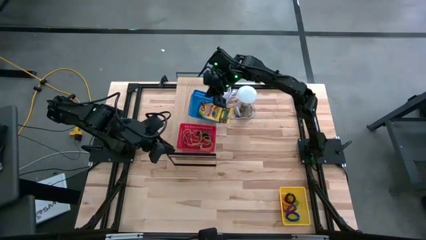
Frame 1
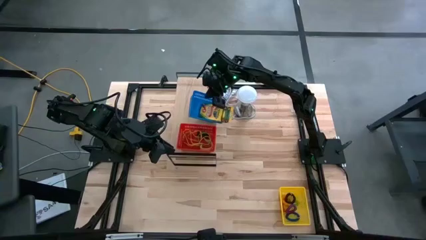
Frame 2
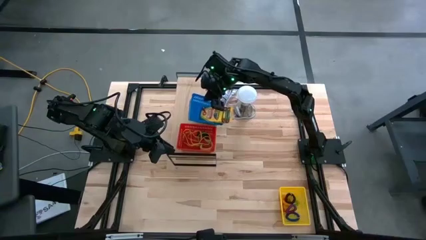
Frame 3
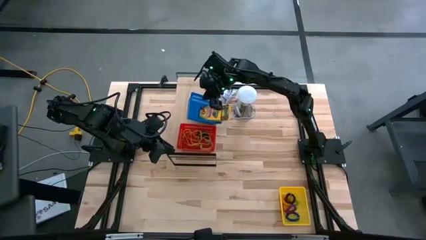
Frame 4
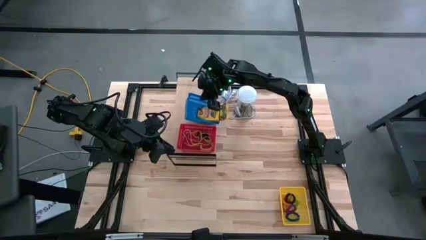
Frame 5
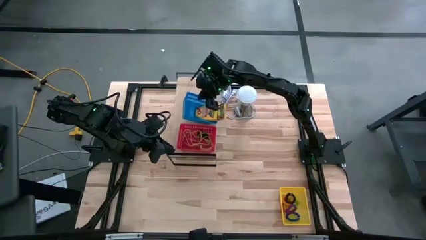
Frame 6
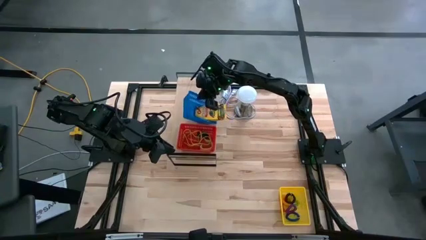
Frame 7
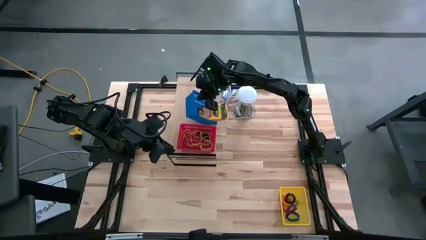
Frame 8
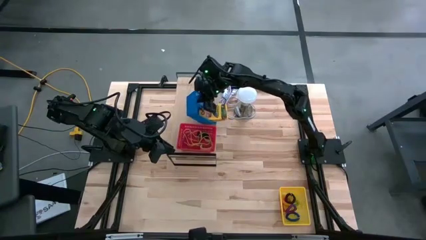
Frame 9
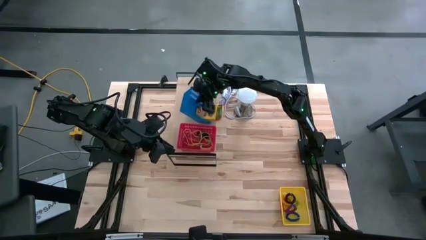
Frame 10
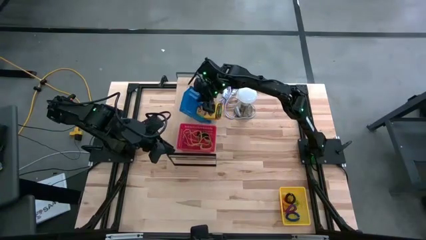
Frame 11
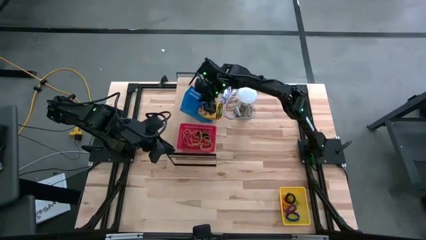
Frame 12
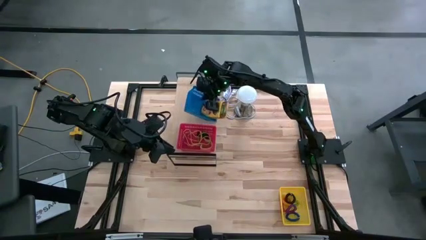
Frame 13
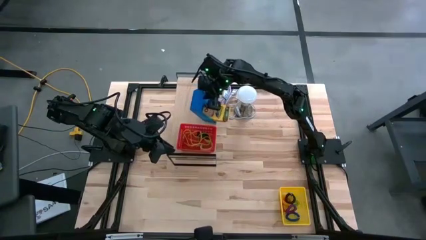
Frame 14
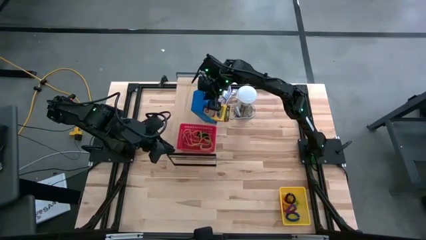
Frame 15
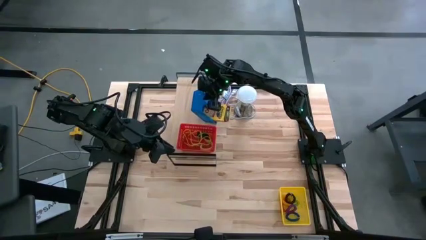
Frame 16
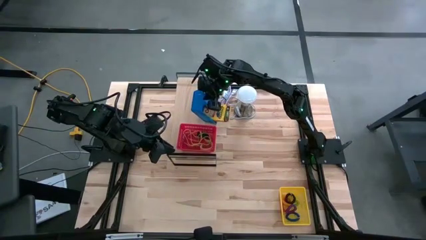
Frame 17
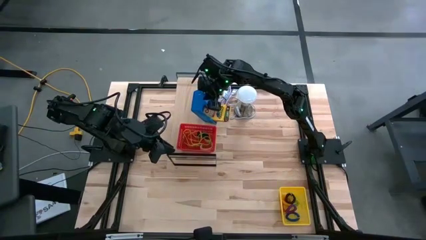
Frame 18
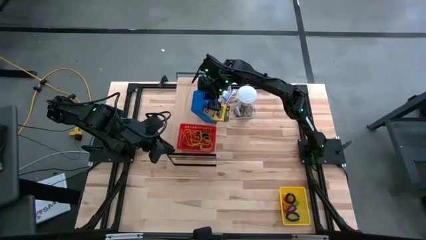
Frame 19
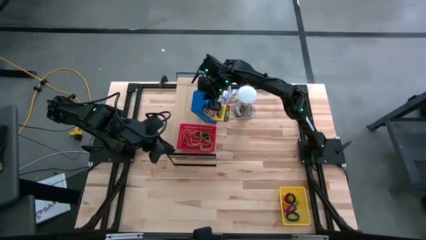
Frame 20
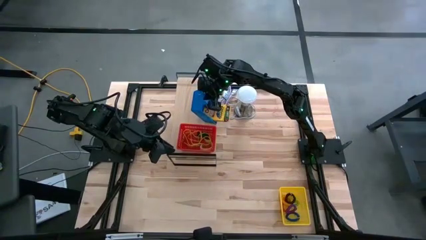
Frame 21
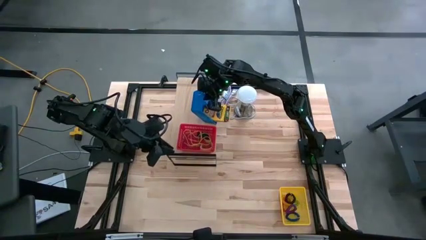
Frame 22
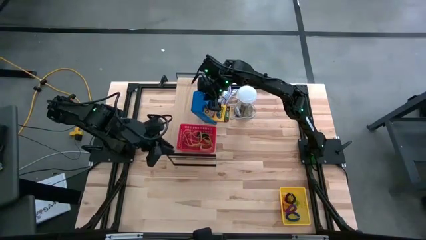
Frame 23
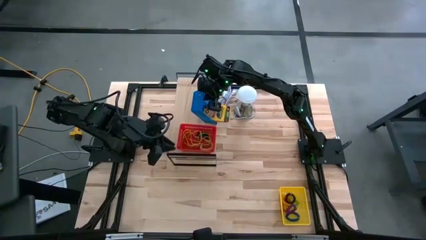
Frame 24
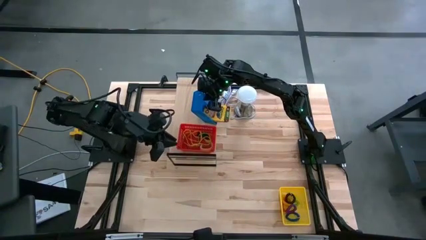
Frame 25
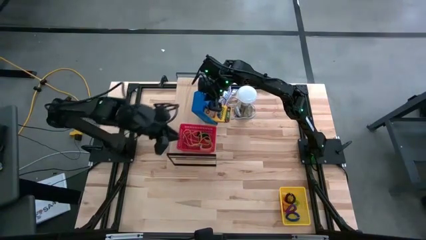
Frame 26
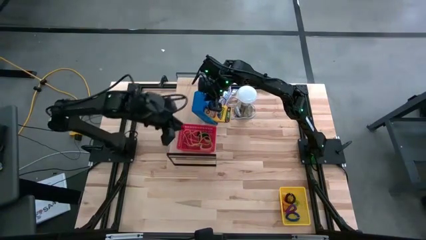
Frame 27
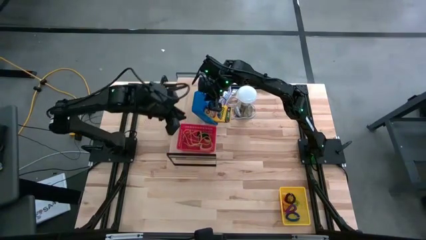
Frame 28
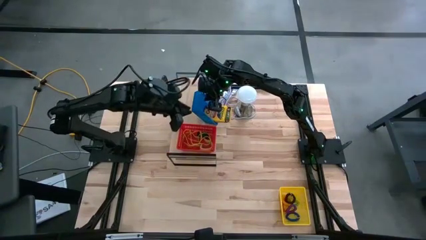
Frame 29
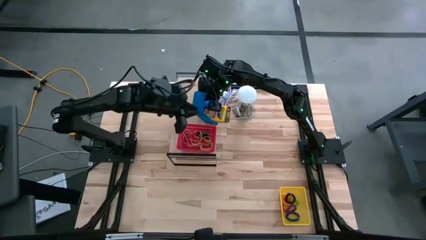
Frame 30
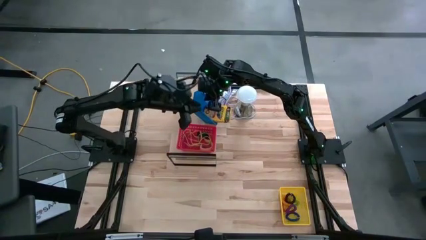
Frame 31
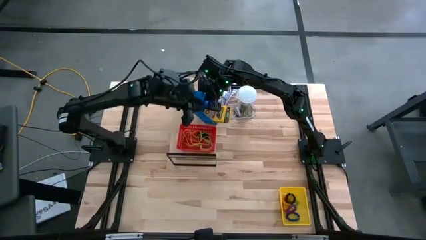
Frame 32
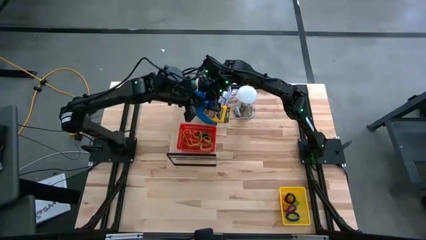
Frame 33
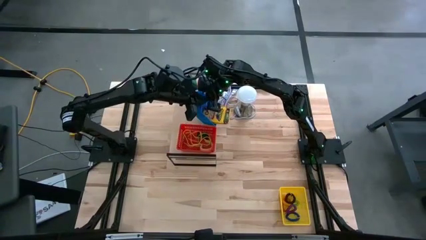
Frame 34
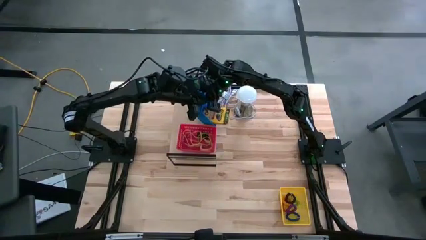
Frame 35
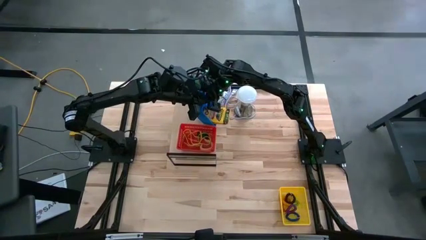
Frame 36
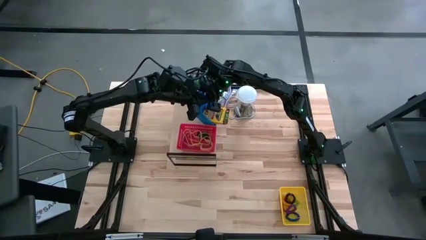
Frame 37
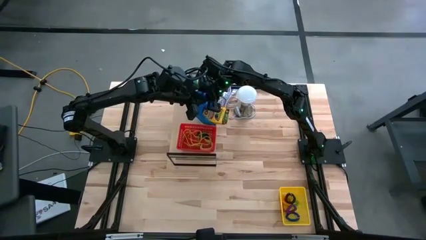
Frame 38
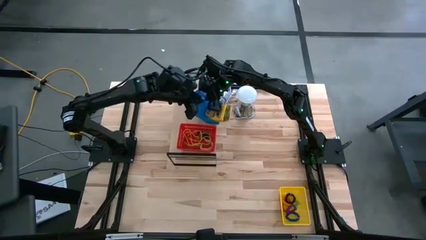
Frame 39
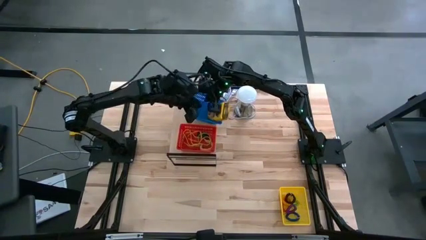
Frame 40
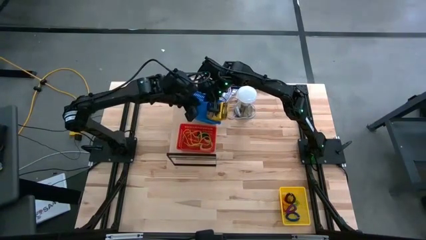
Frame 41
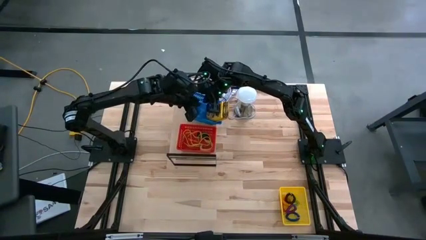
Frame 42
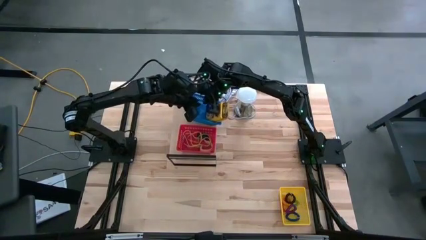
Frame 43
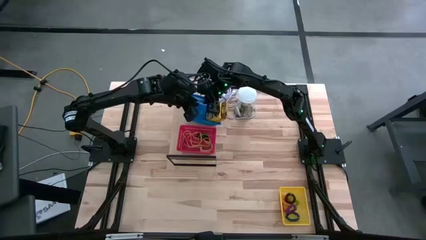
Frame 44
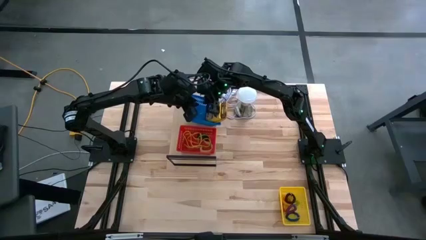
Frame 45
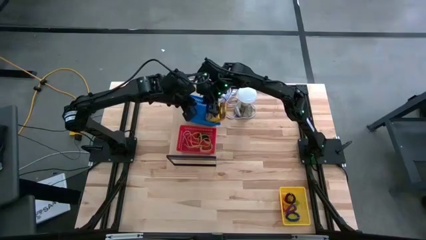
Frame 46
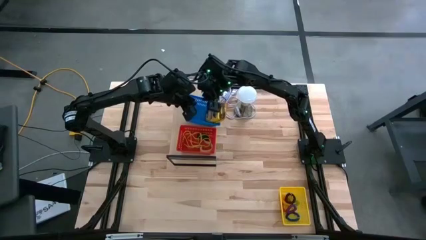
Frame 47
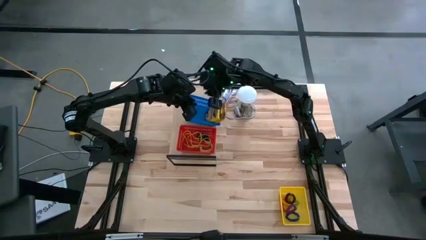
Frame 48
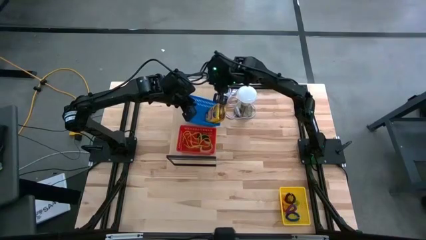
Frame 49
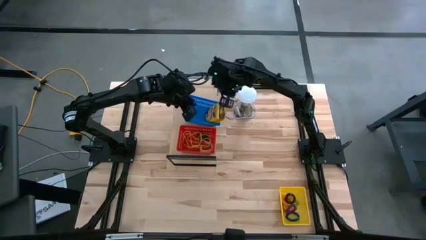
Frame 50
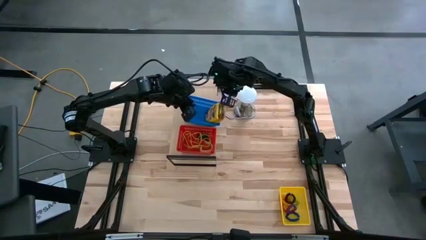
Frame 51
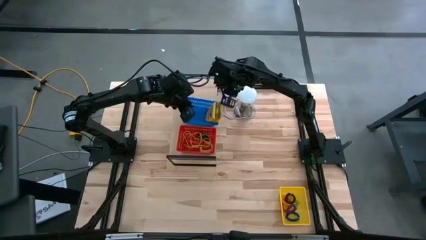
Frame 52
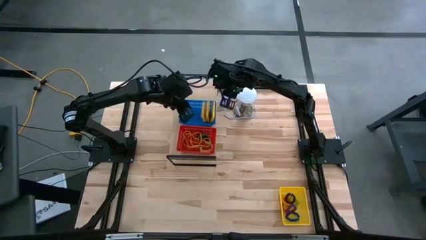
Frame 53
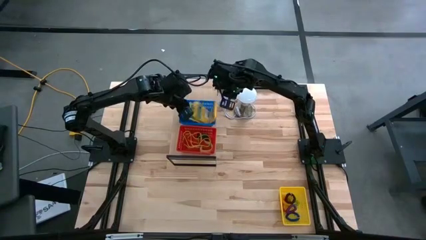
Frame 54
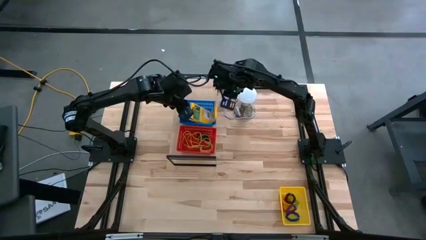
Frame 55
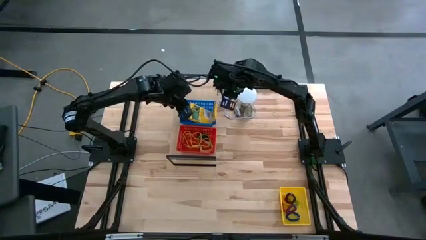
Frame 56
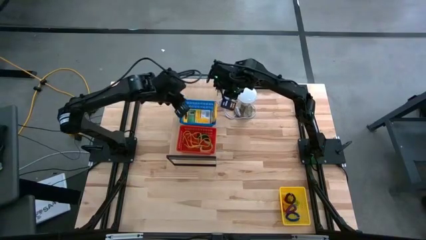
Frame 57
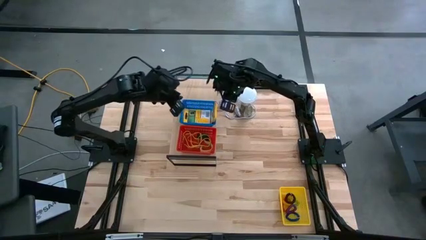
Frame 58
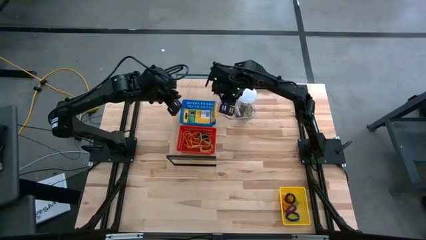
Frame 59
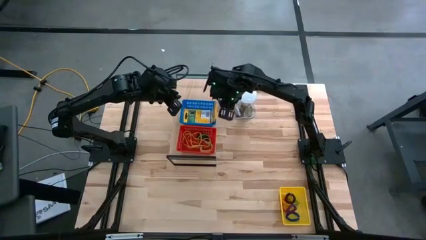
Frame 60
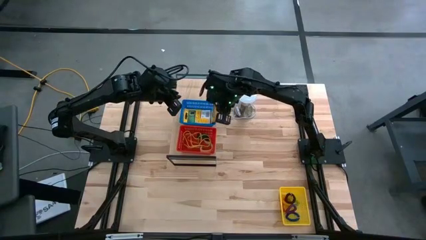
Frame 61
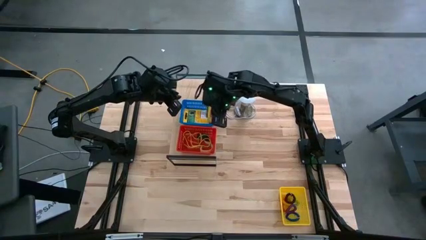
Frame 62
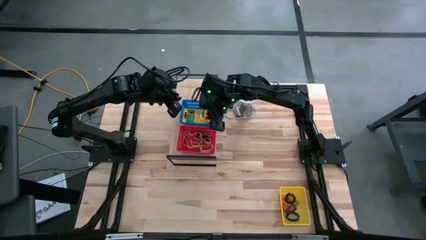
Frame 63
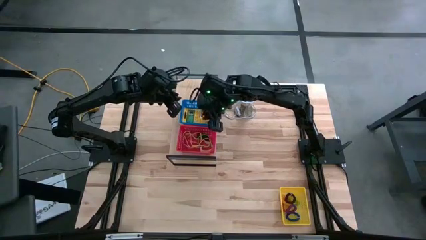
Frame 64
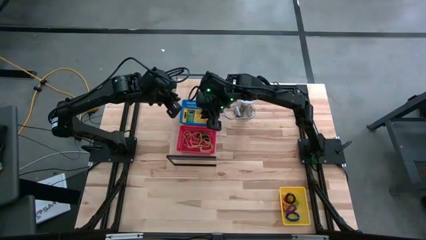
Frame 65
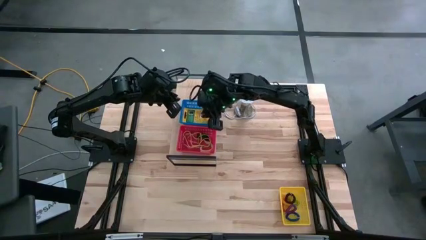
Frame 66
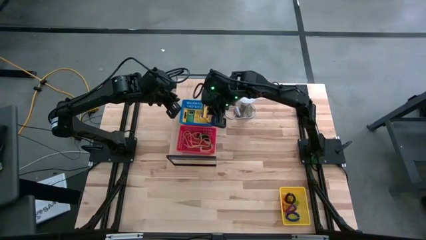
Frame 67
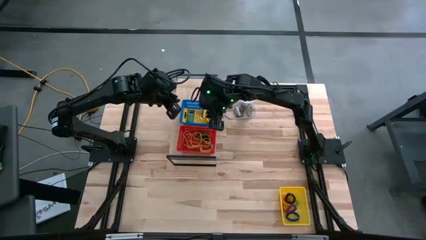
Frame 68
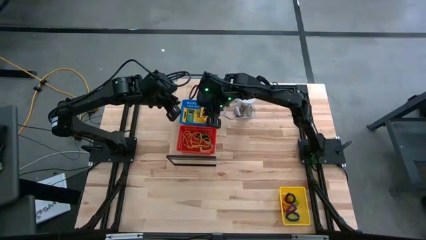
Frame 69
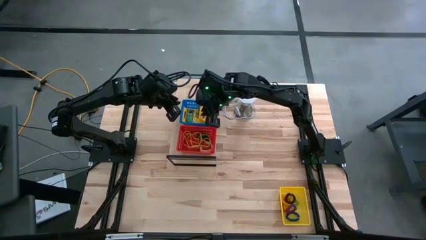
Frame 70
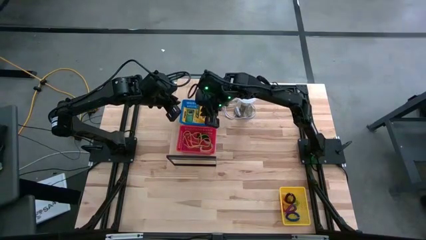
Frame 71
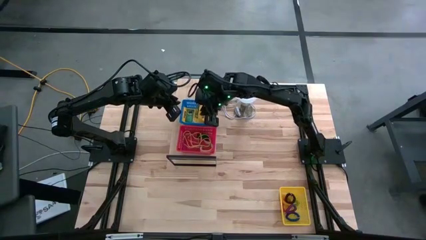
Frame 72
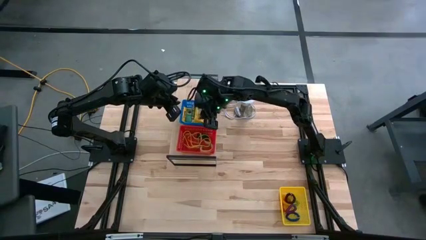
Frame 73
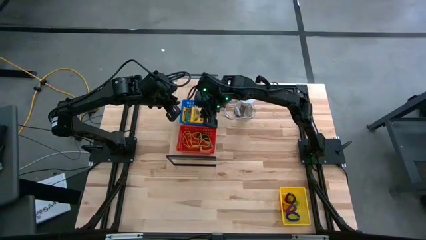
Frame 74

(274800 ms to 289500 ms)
Task: Pick & Place Office Desk Supplies
Put the blue bin on the shelf

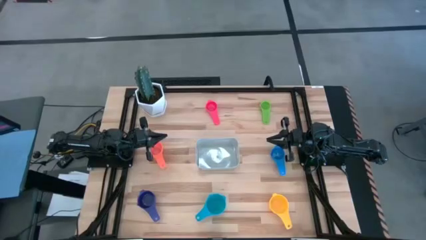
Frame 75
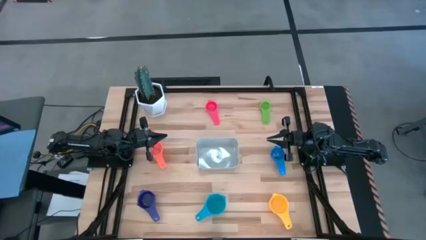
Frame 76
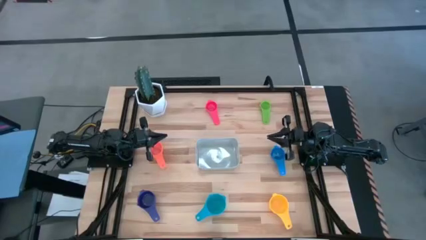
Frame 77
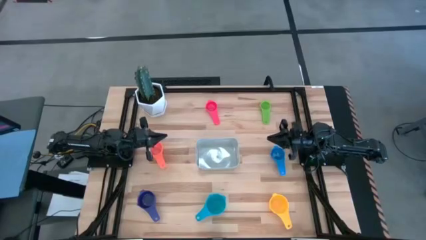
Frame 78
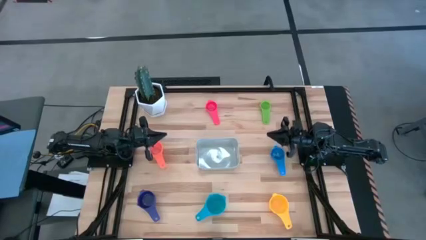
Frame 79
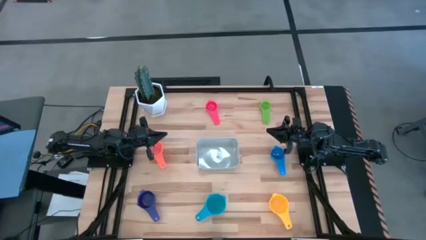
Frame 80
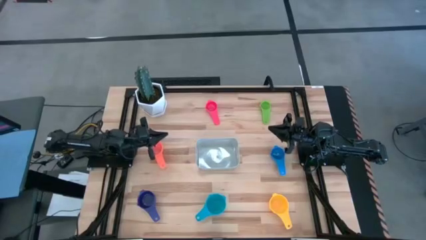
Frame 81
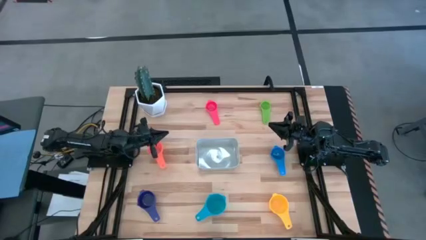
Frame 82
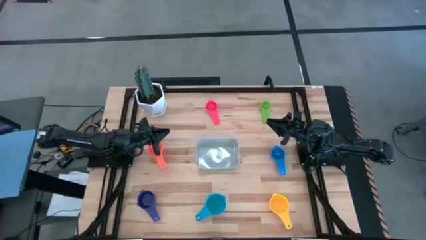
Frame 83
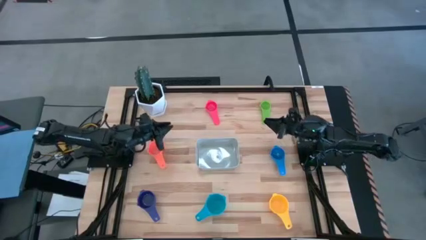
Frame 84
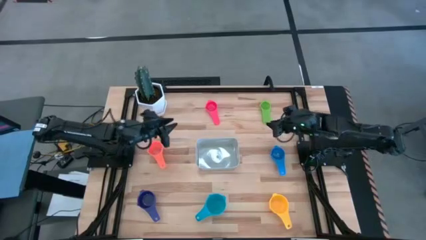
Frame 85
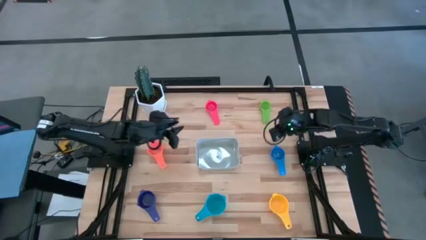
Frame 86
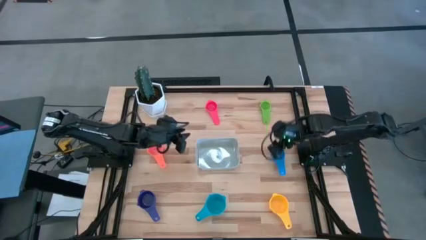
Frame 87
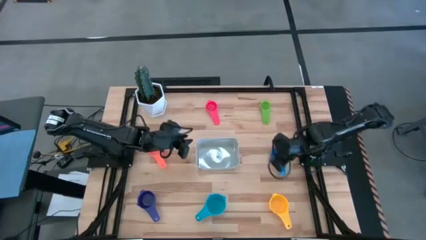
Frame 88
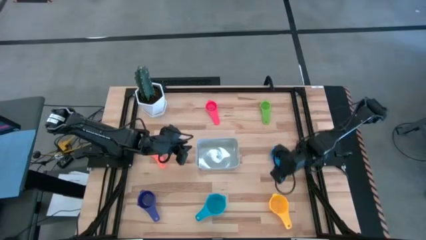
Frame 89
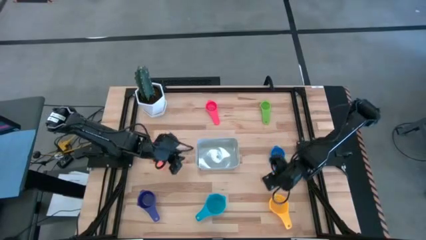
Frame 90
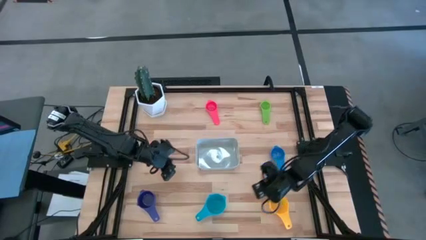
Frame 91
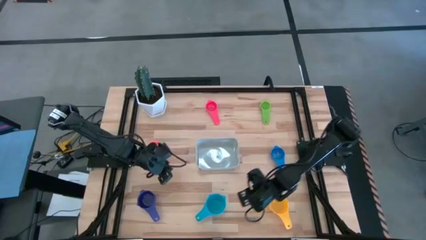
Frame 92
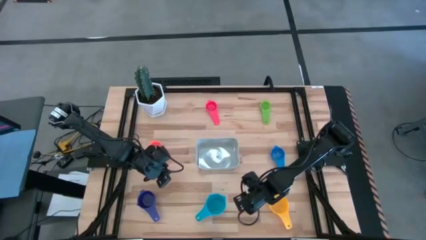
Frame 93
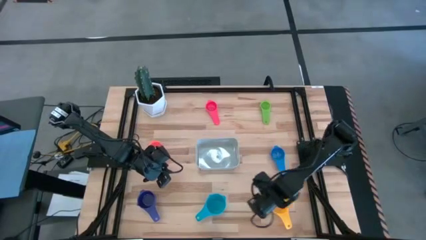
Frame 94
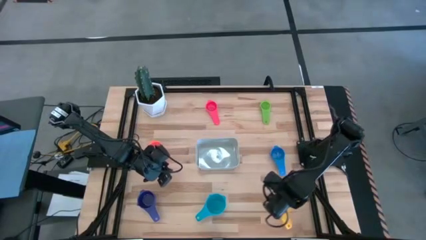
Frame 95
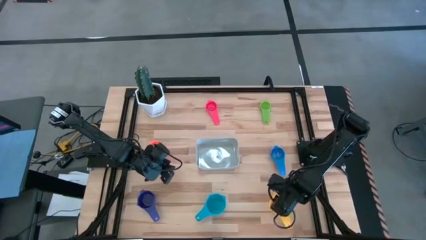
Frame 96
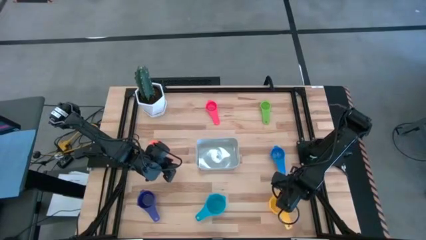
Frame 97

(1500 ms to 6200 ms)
Task: Nest measuring cups in basket
Stack the yellow measuring cup on top of the light blue measuring cup
